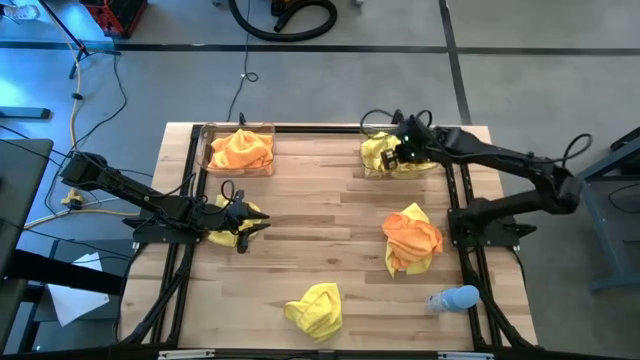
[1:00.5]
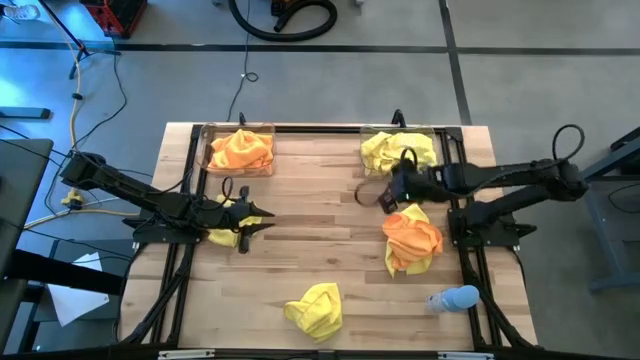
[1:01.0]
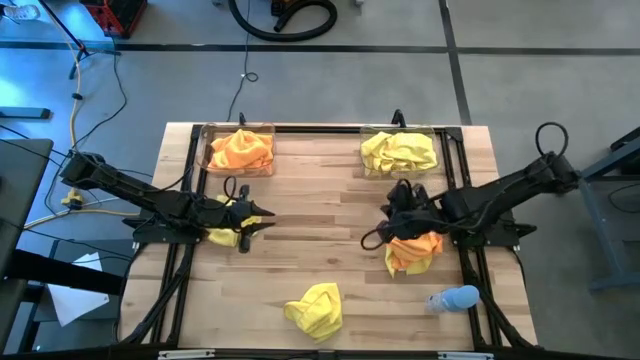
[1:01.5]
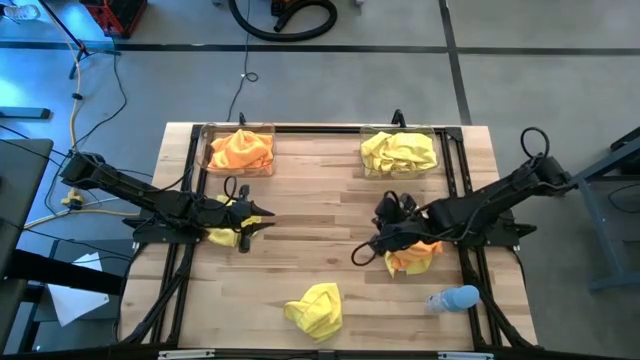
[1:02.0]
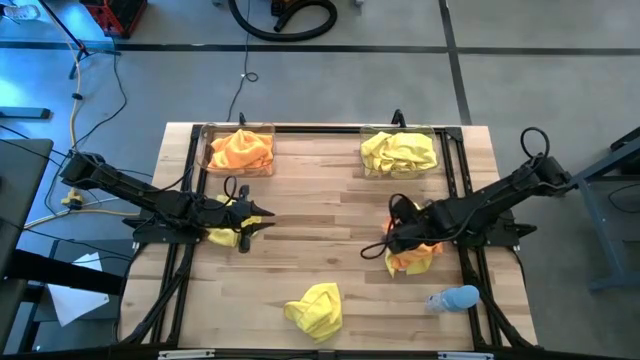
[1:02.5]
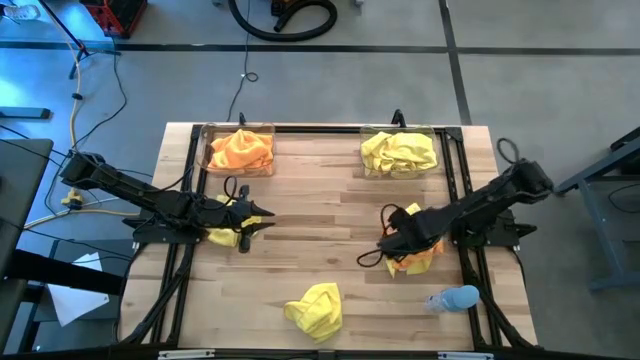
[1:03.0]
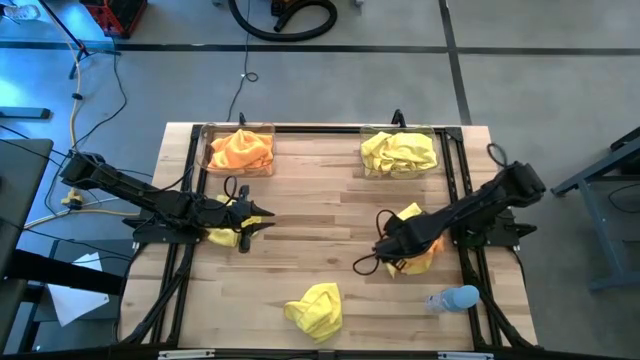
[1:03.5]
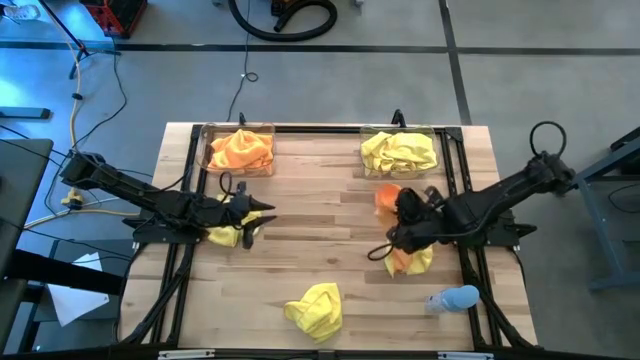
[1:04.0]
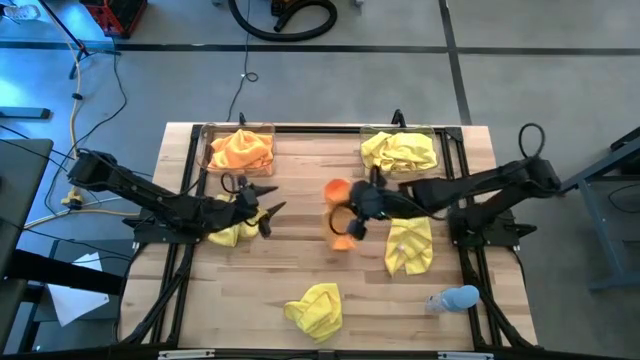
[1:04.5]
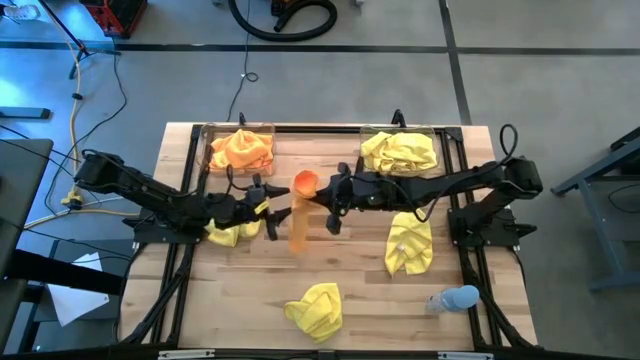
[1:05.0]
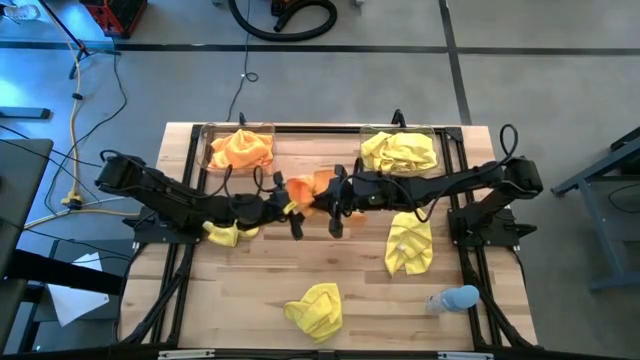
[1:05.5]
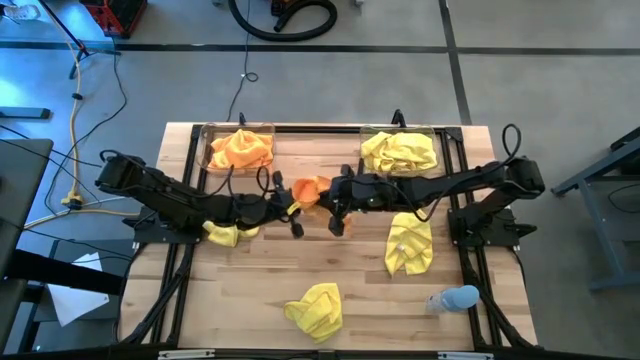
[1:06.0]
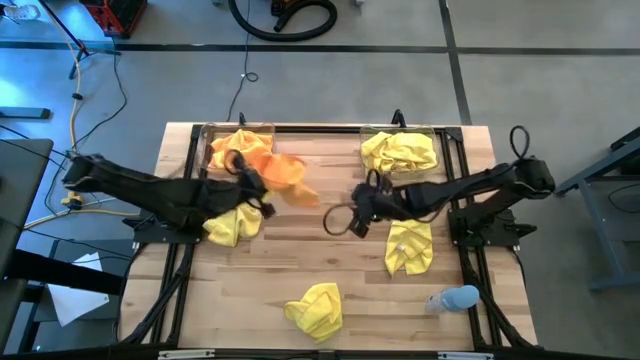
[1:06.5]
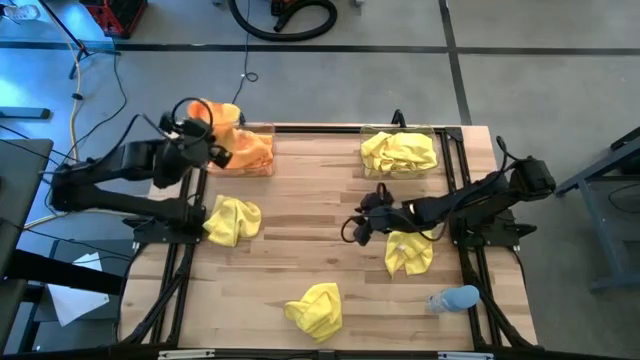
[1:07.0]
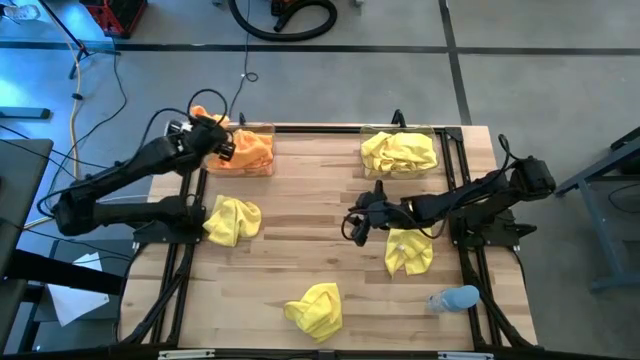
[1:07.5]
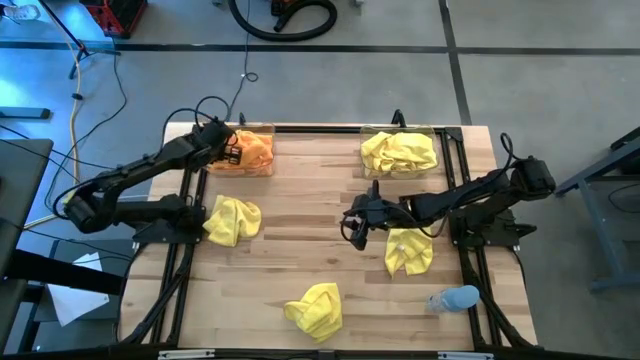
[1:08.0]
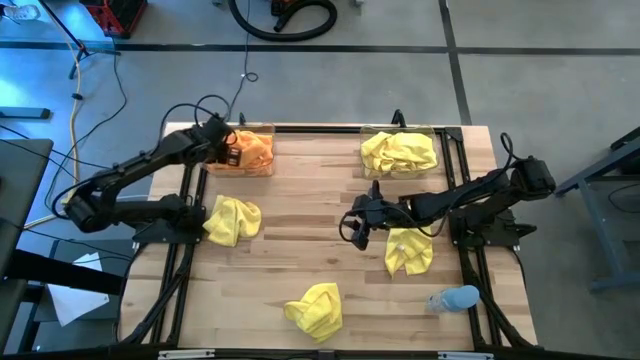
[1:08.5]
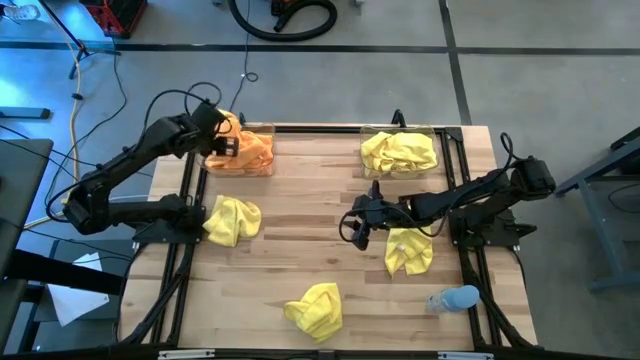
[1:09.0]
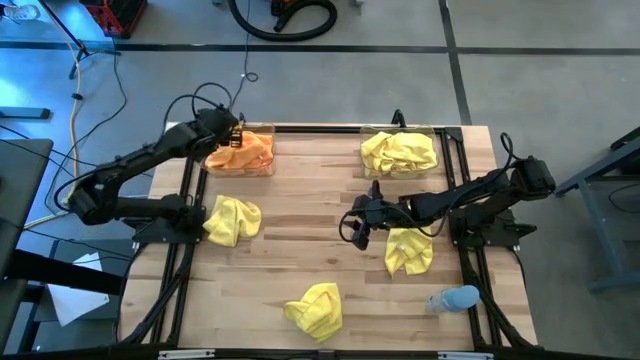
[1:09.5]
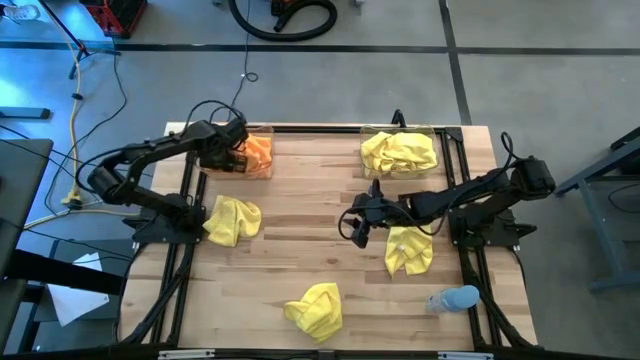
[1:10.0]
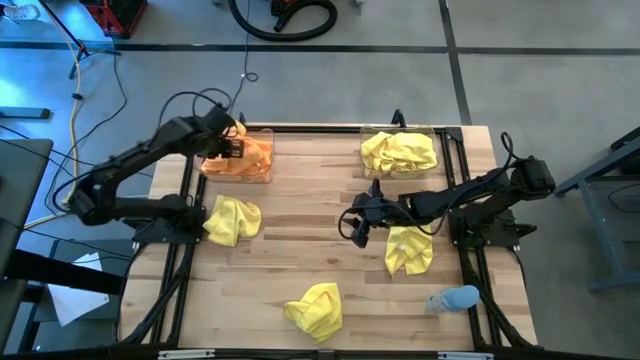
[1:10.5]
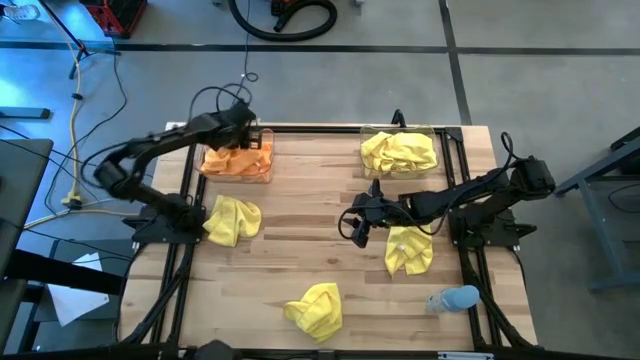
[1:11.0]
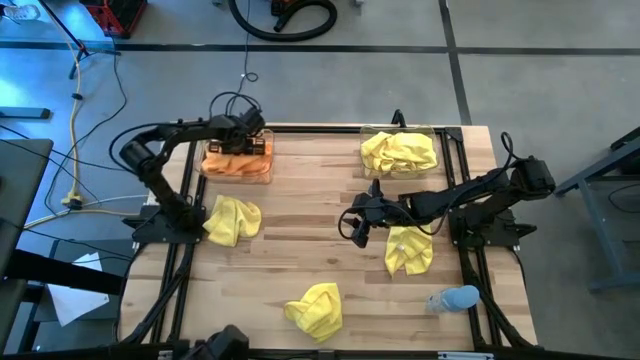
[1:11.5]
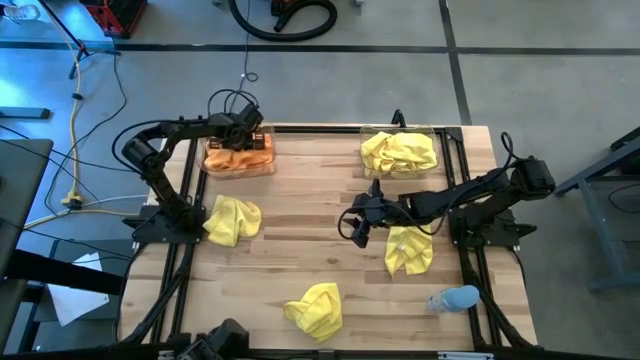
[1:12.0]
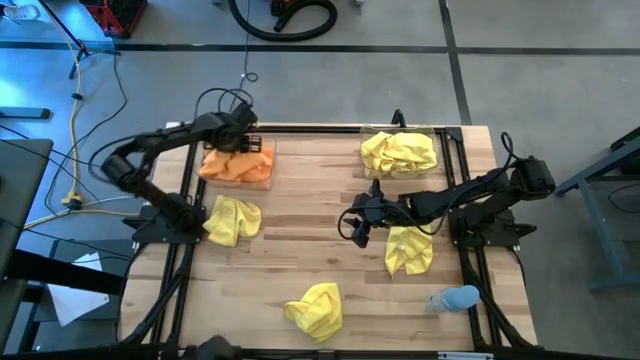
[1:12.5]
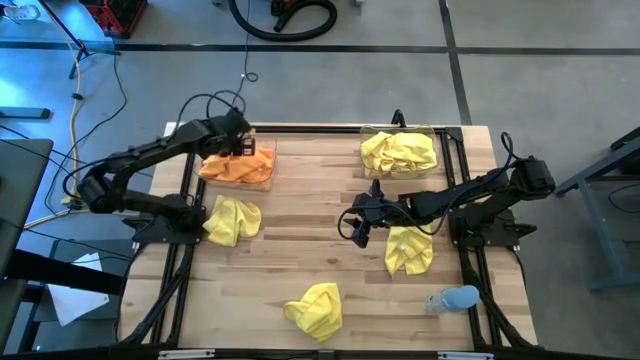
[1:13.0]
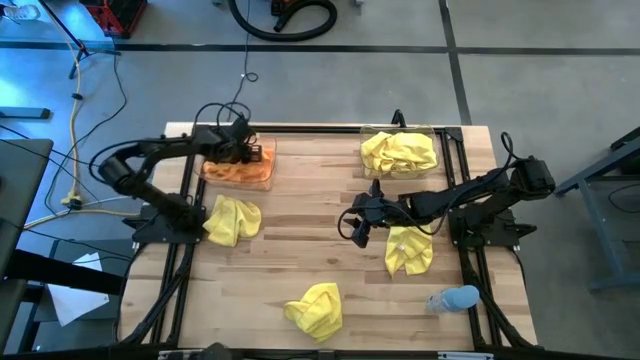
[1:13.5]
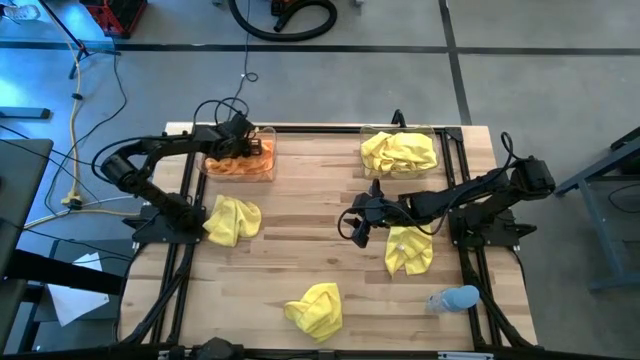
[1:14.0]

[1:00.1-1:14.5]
Task: Sort microfiber towel by color & place in baskets
Put the orange microfiber cloth into the left transparent bin

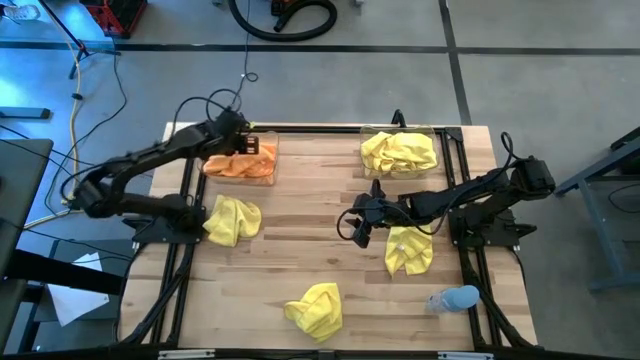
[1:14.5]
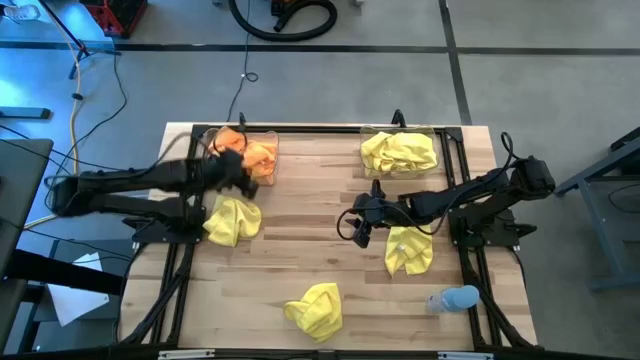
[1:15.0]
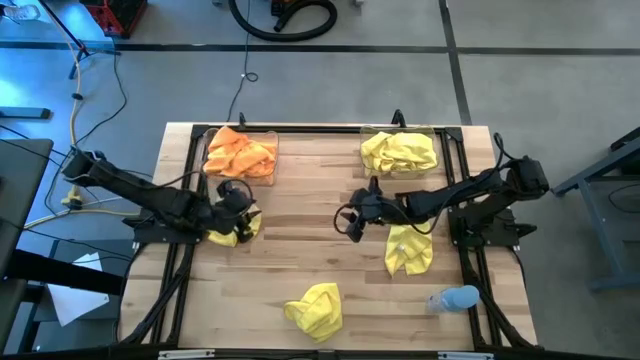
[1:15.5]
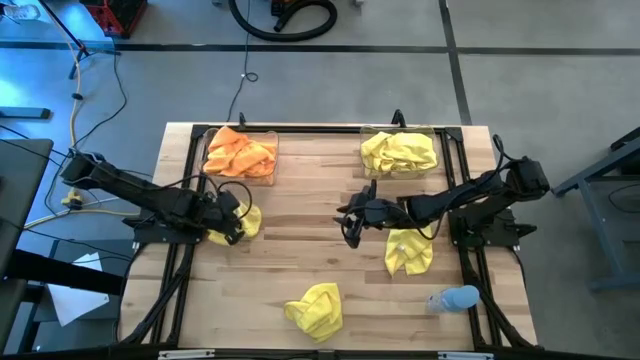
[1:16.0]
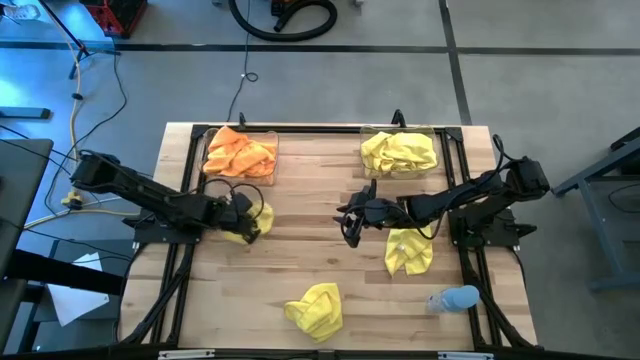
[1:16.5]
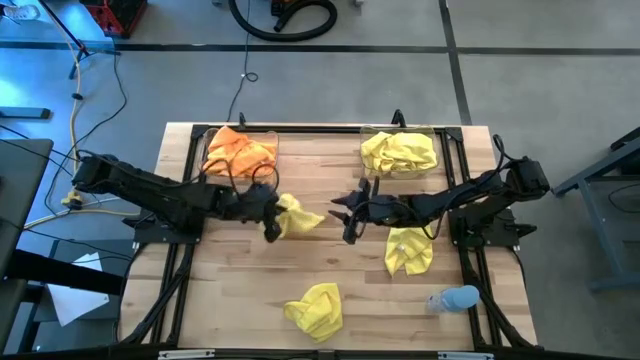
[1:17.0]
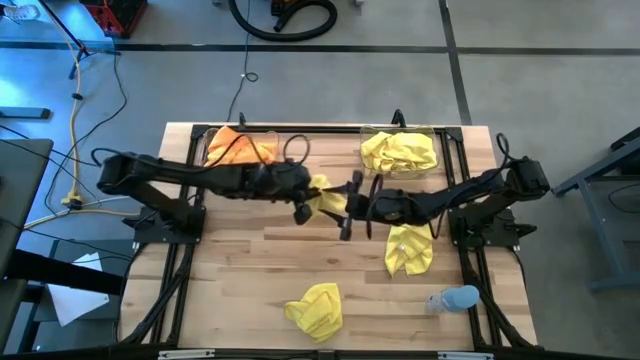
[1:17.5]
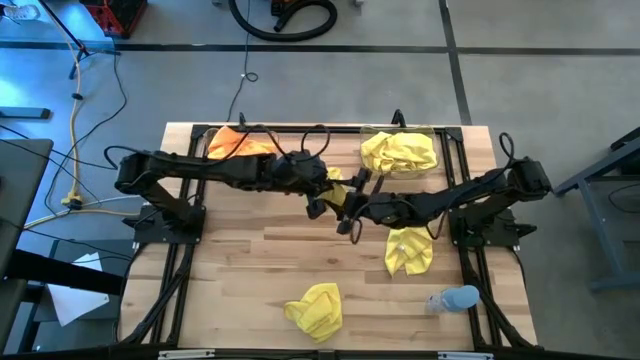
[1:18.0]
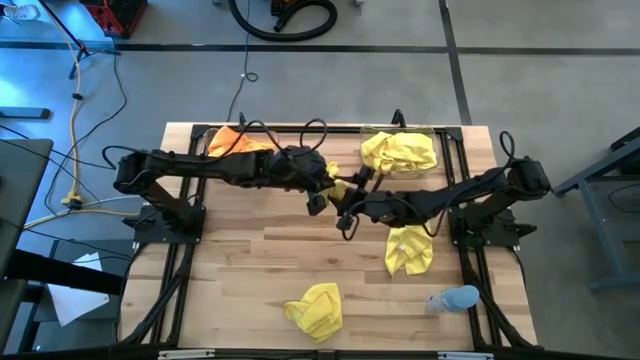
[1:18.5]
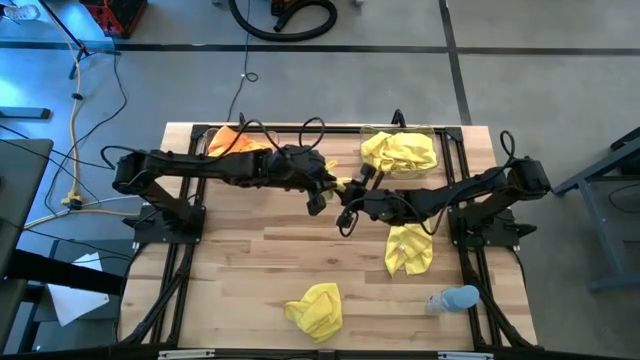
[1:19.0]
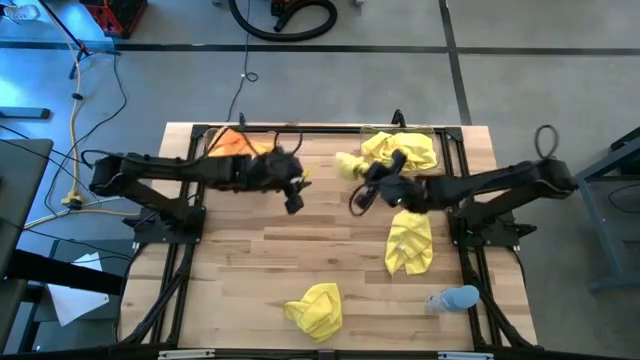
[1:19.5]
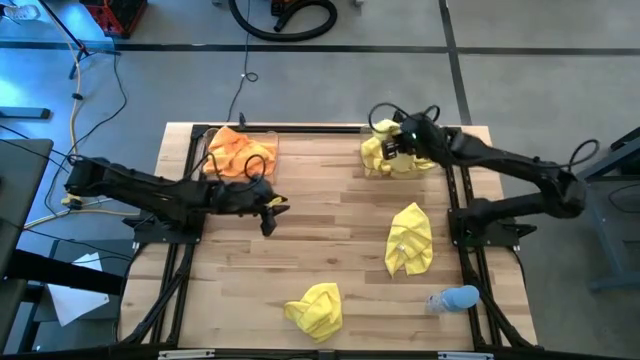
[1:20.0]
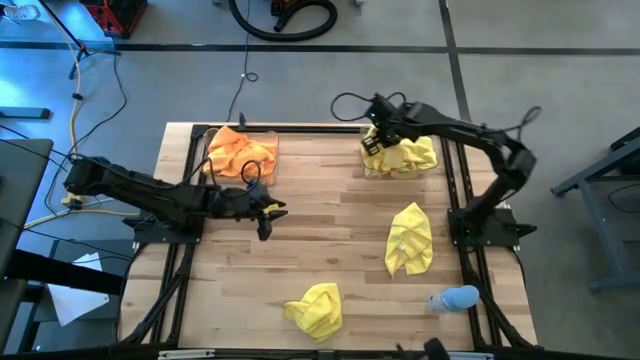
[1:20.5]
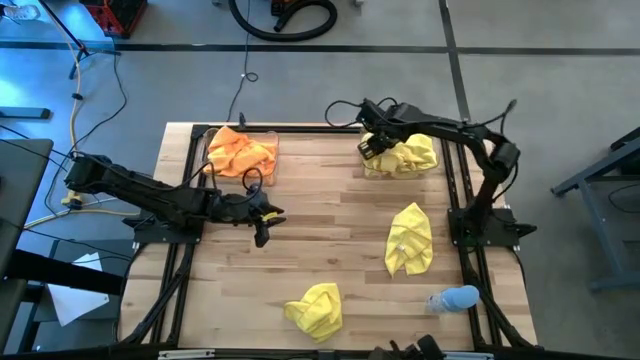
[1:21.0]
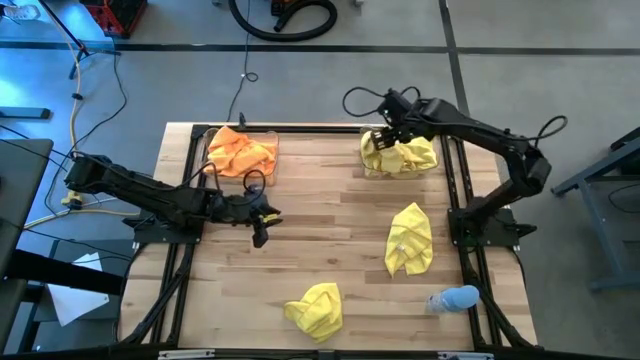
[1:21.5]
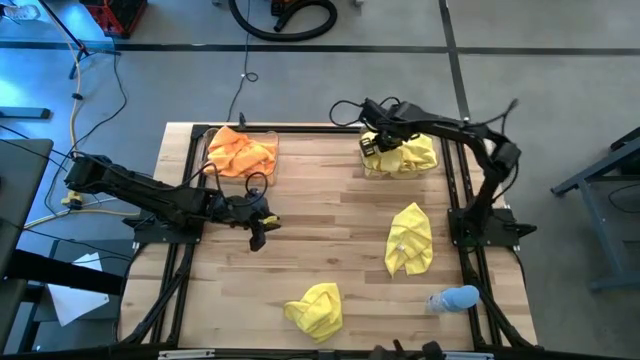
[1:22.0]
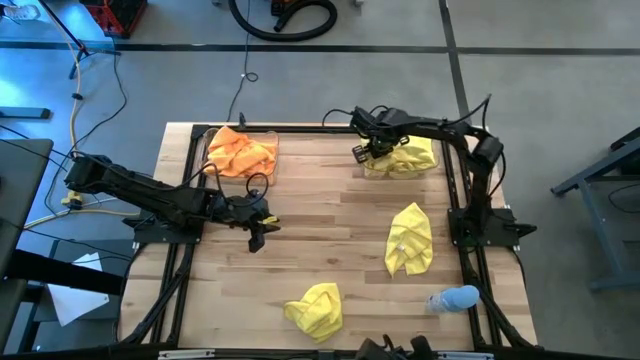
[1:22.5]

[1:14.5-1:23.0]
Put the top left yellow microfiber cloth into the right transparent bin
